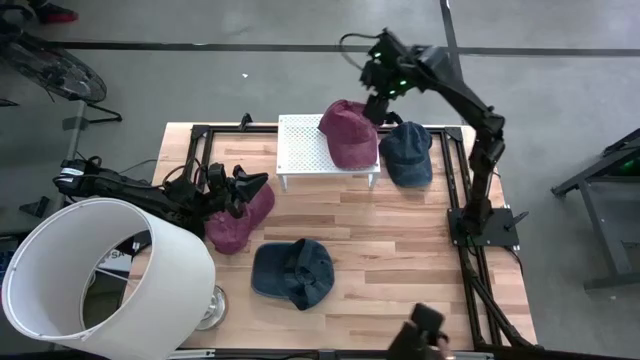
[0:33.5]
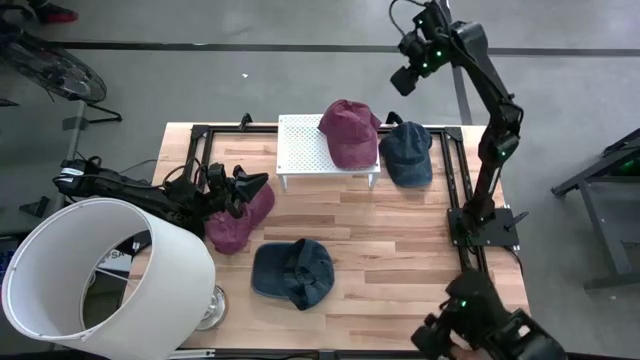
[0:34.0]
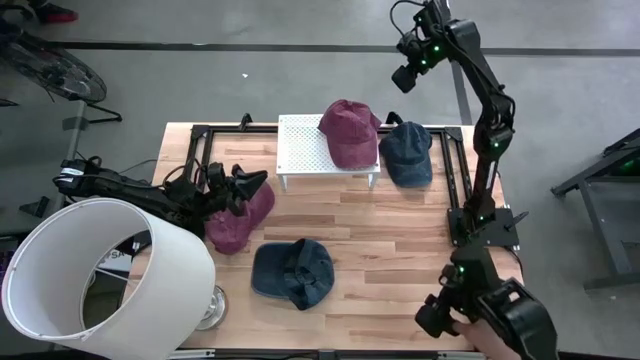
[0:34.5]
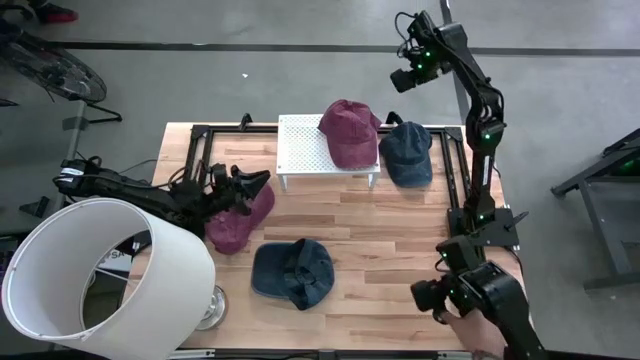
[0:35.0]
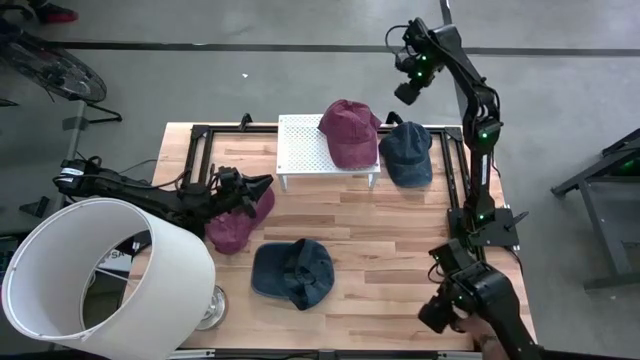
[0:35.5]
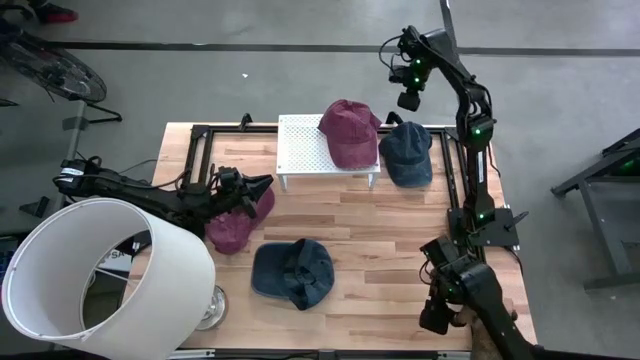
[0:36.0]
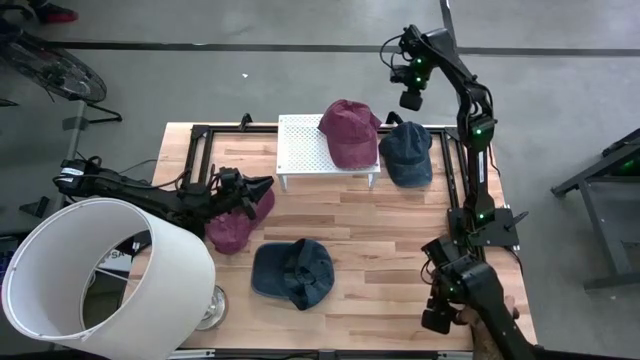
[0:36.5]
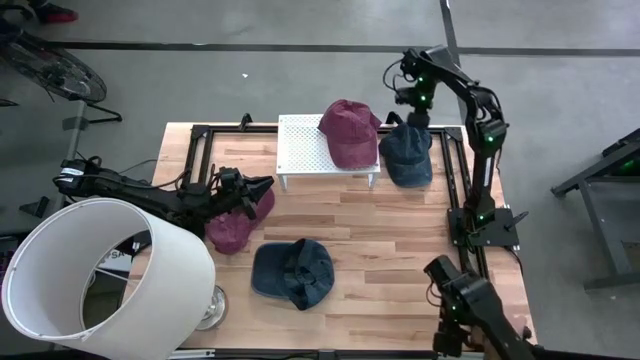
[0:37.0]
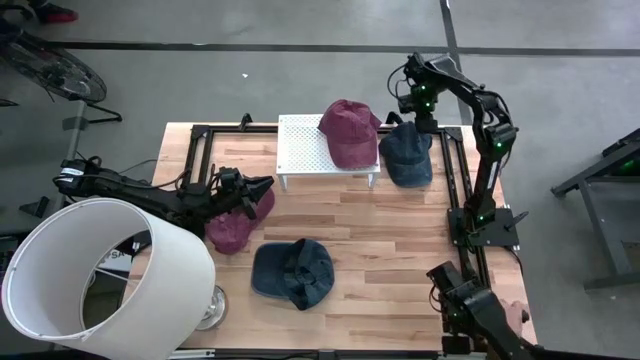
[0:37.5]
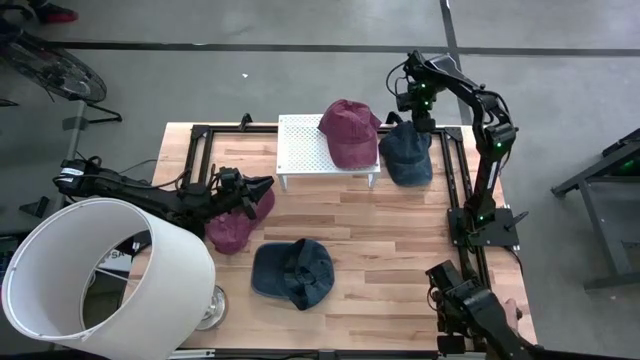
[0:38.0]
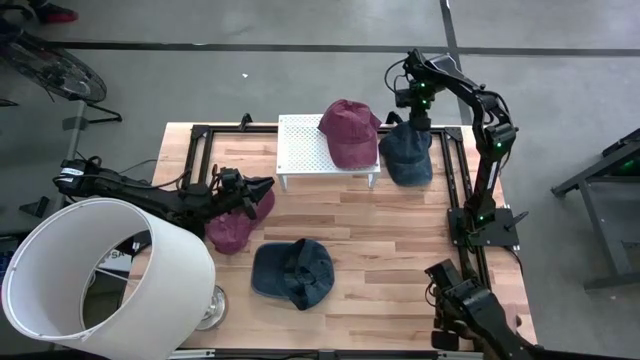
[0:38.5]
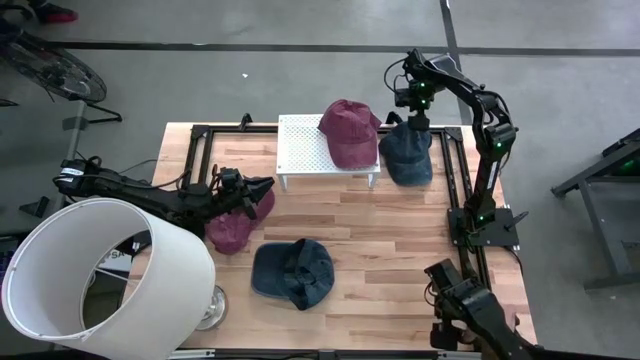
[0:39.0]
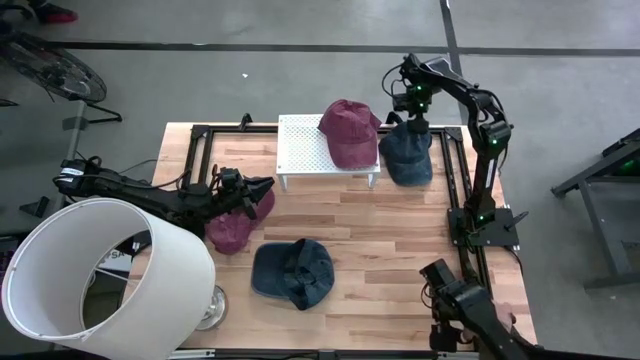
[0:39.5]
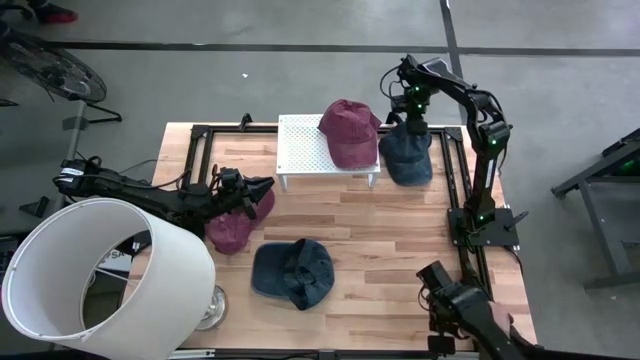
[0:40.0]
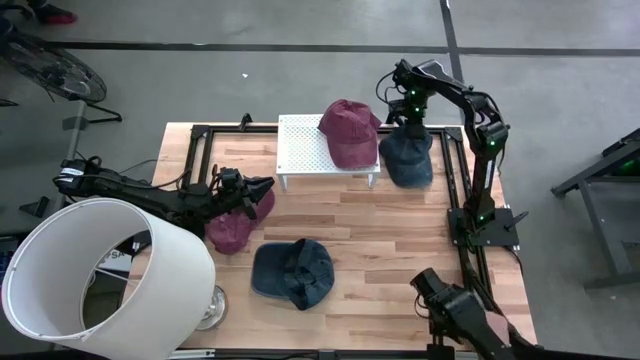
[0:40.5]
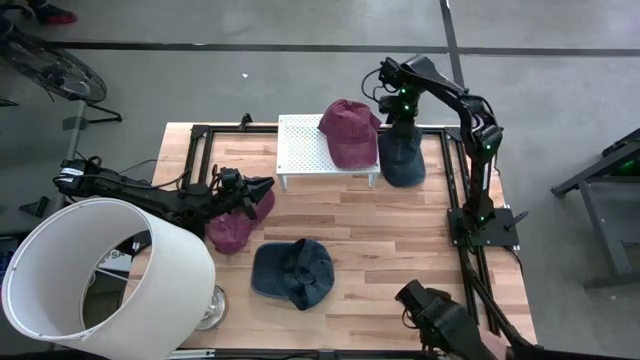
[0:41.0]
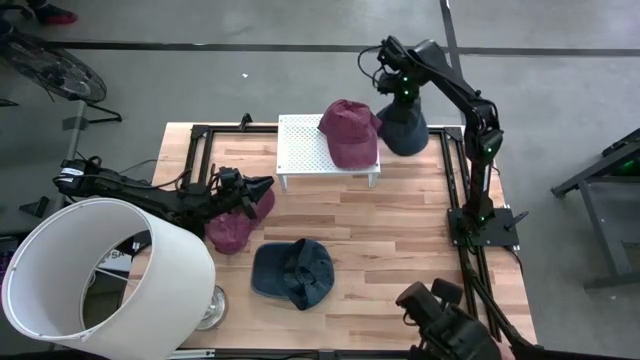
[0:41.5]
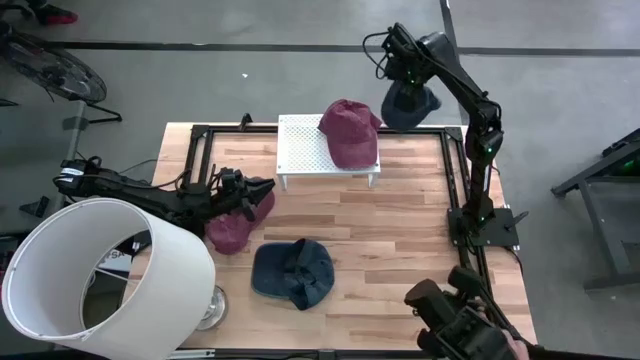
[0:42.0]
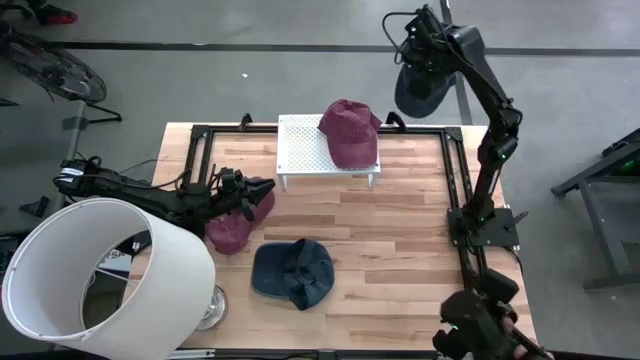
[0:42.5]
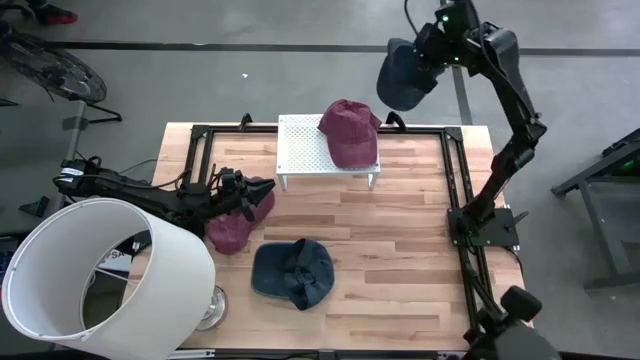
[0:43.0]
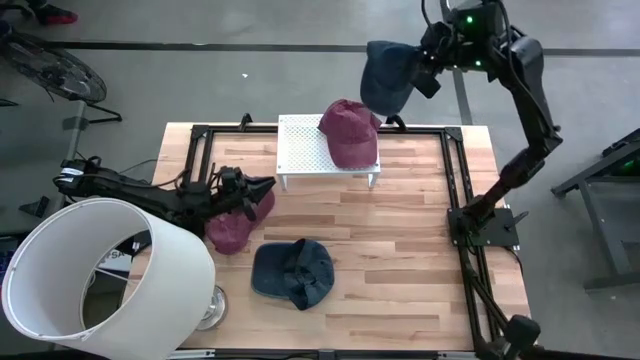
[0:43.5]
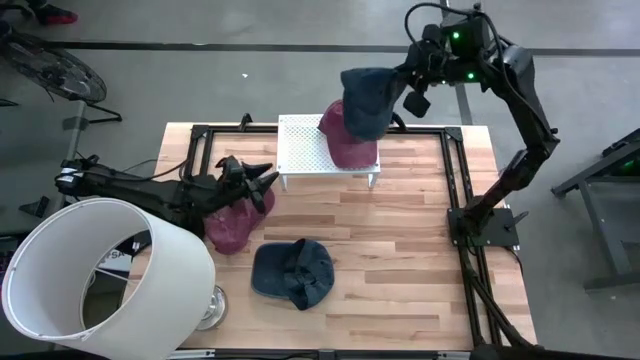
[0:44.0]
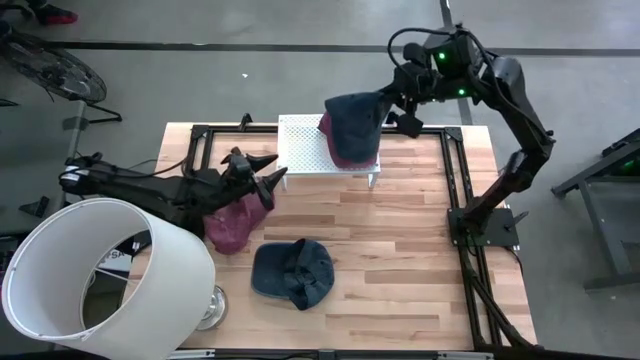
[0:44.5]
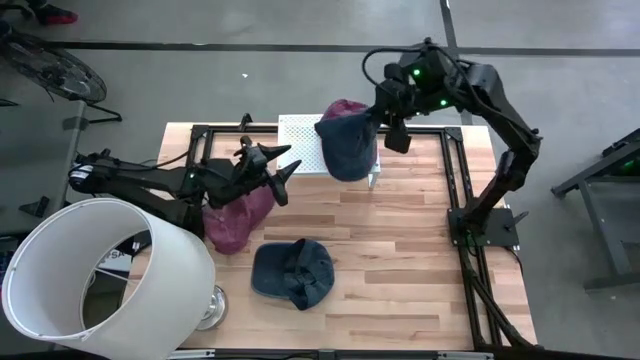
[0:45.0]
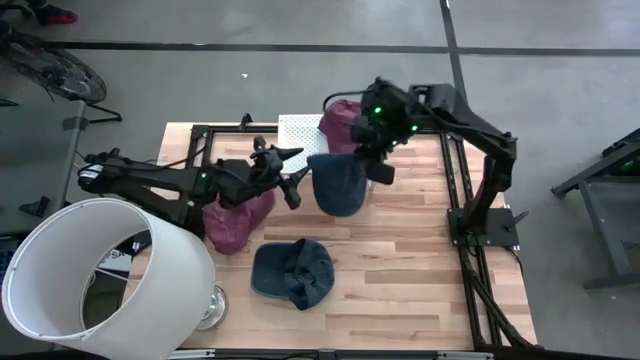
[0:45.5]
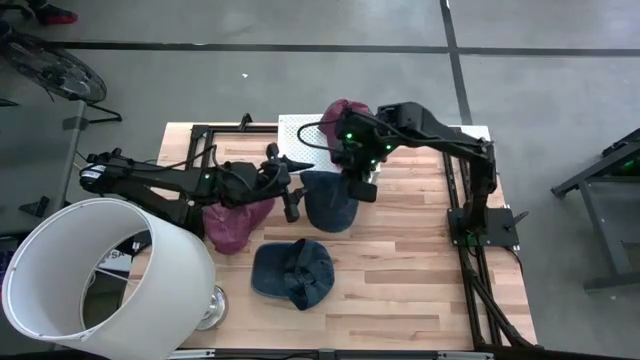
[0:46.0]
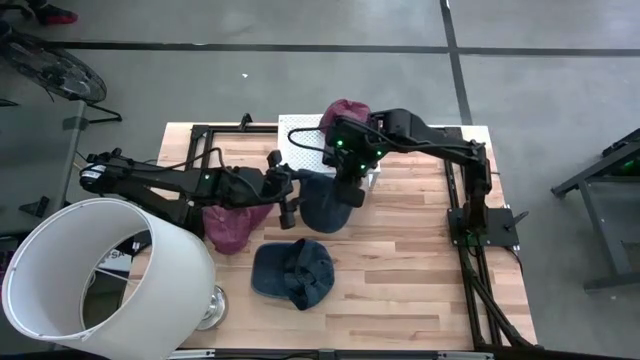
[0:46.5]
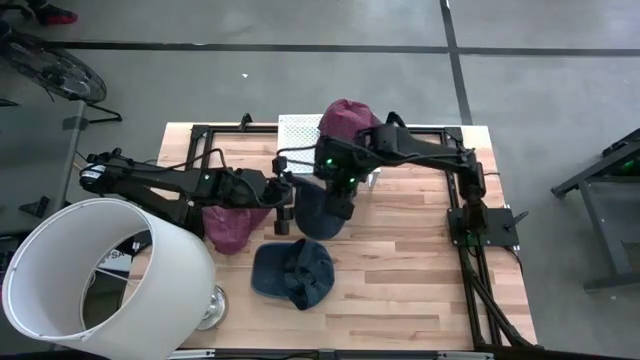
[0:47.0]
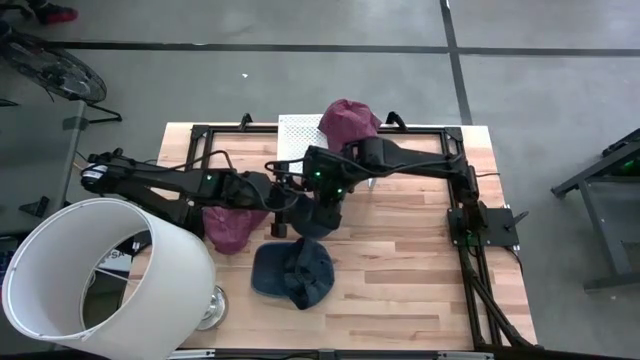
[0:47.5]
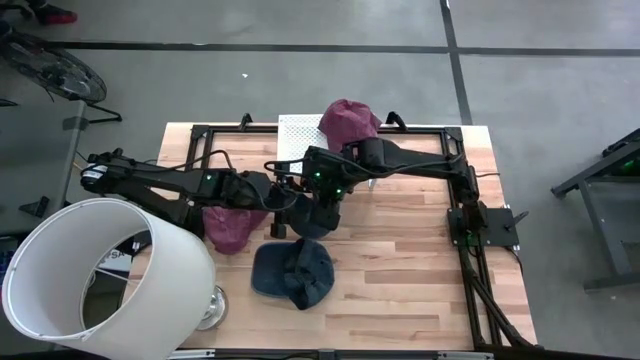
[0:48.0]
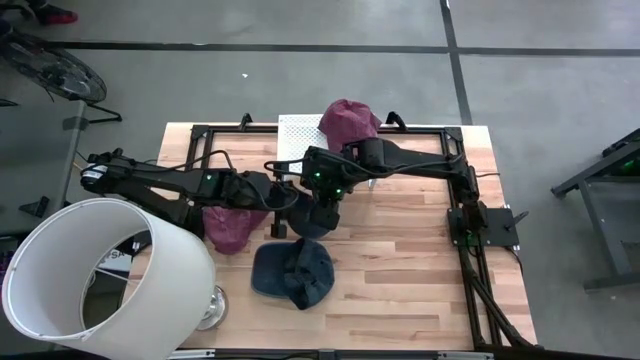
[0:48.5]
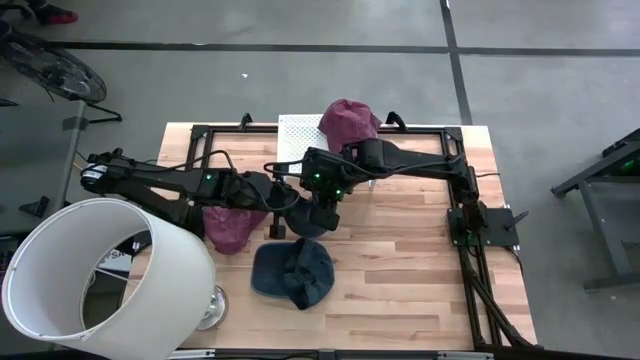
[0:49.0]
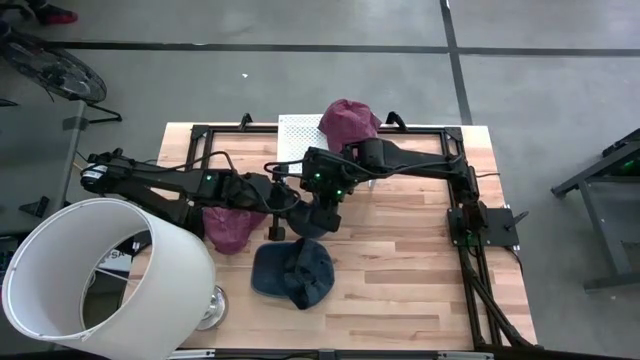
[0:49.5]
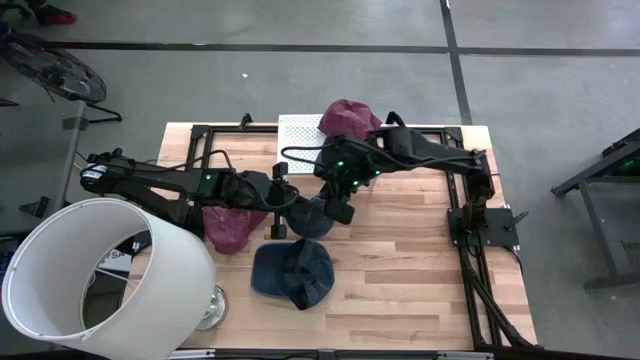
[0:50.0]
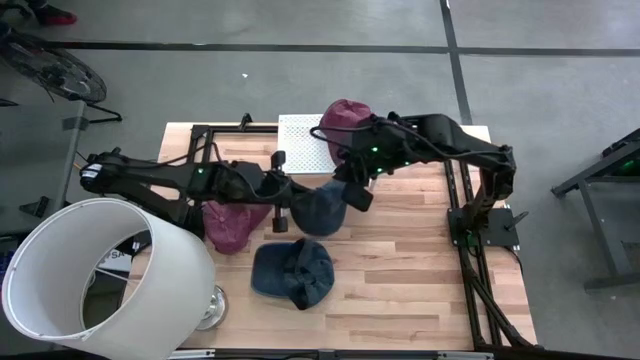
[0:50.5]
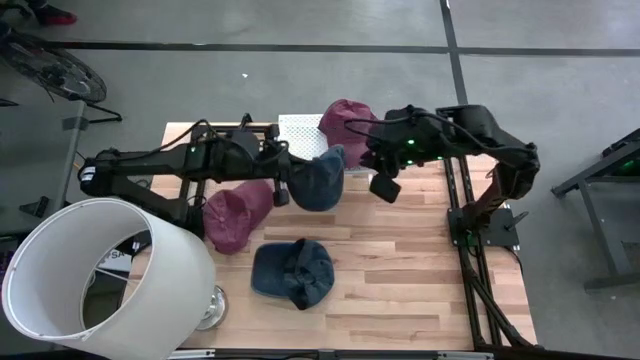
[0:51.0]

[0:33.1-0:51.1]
Task: Pick & Place hat
Put the top black cap on the shelf
